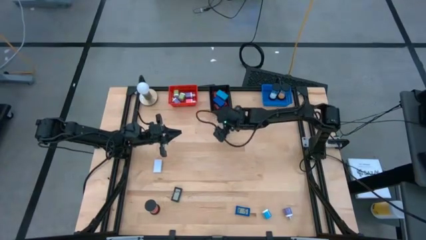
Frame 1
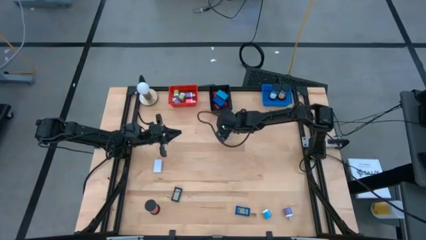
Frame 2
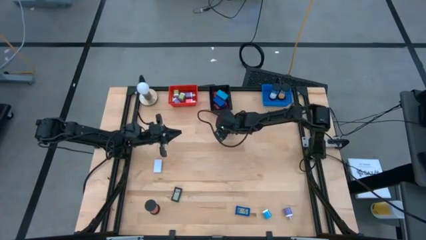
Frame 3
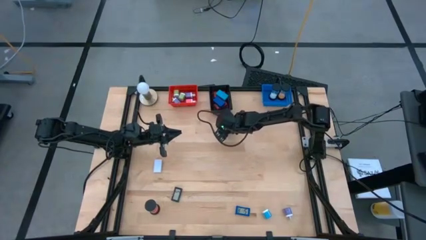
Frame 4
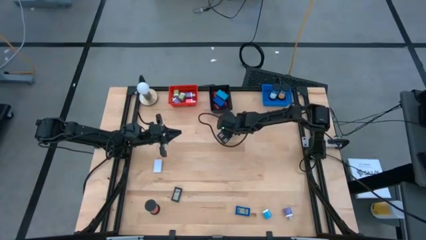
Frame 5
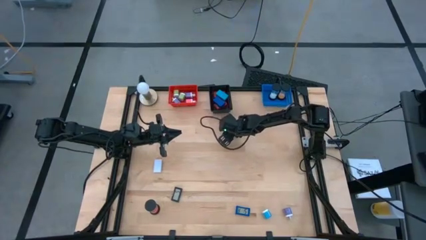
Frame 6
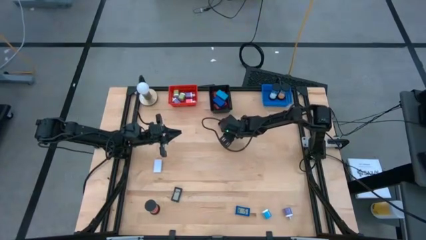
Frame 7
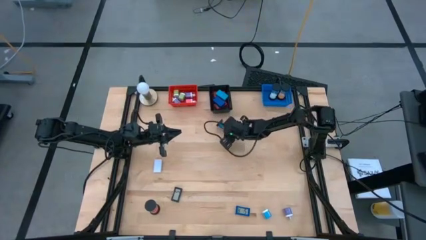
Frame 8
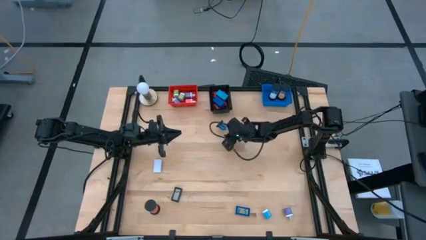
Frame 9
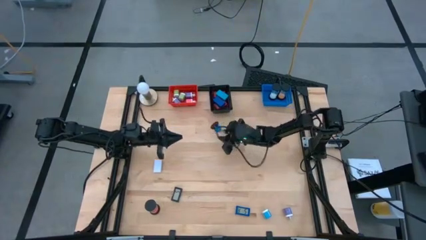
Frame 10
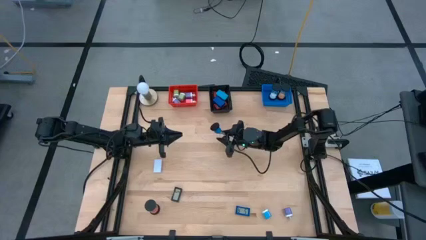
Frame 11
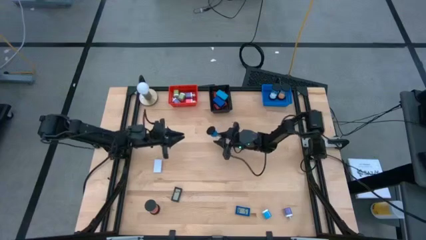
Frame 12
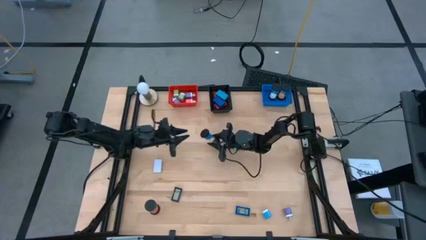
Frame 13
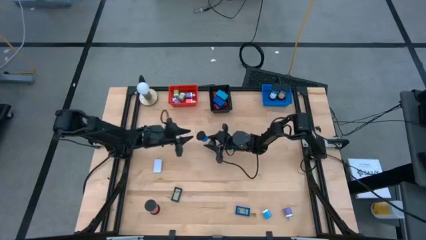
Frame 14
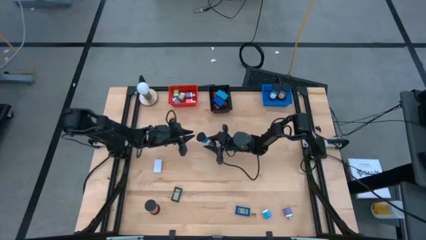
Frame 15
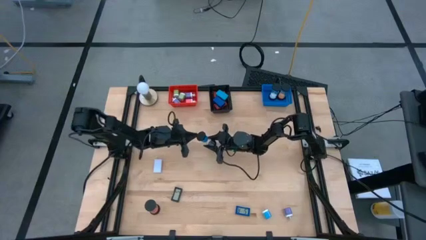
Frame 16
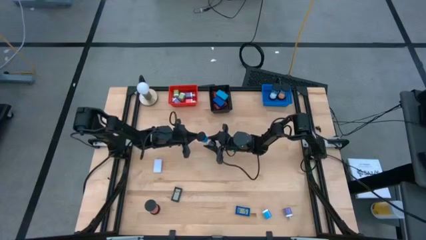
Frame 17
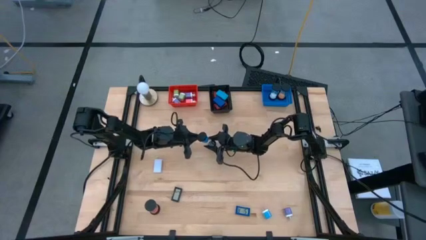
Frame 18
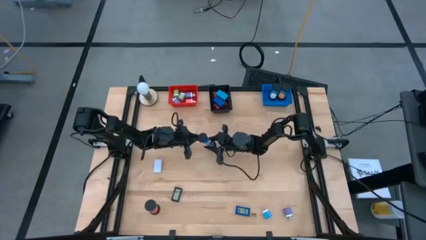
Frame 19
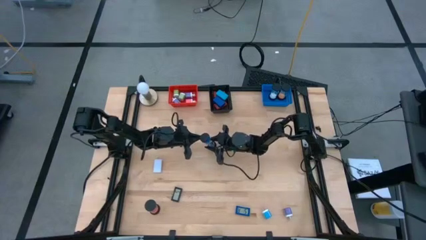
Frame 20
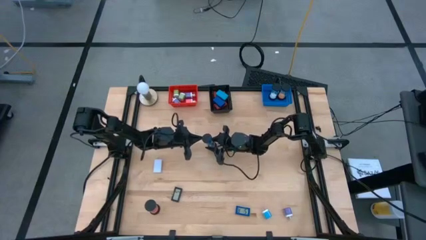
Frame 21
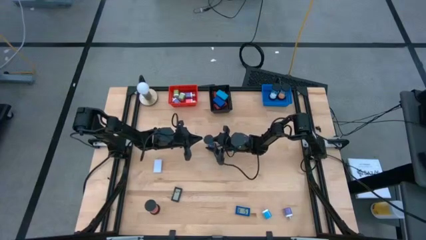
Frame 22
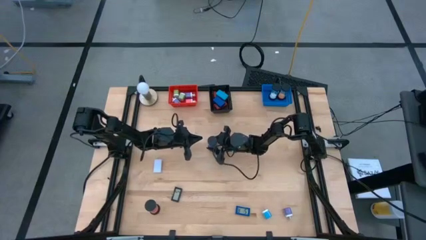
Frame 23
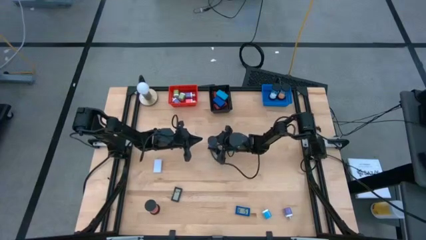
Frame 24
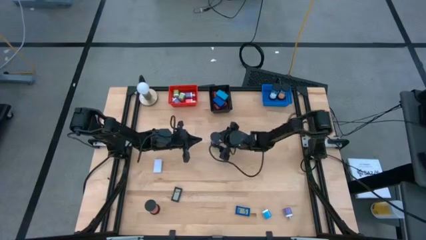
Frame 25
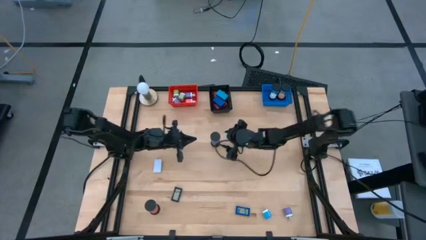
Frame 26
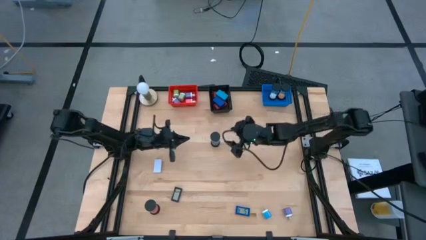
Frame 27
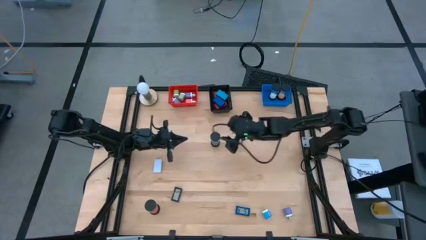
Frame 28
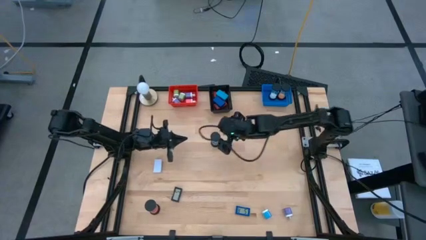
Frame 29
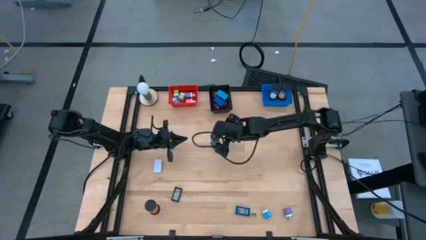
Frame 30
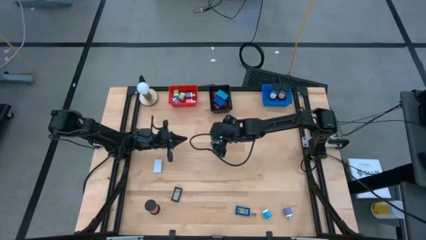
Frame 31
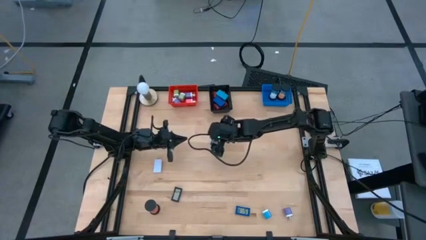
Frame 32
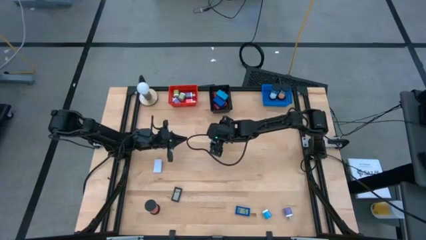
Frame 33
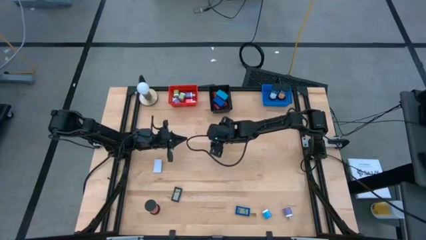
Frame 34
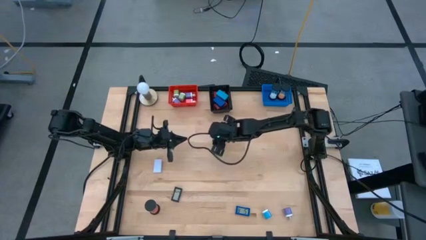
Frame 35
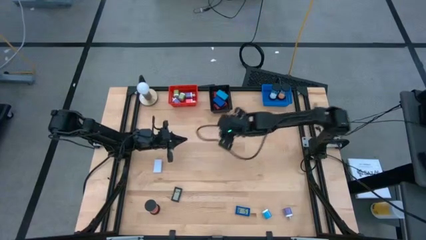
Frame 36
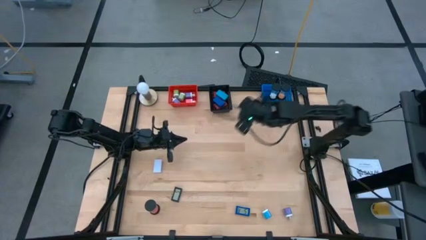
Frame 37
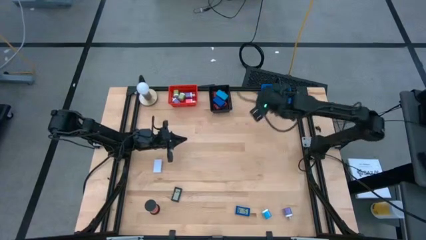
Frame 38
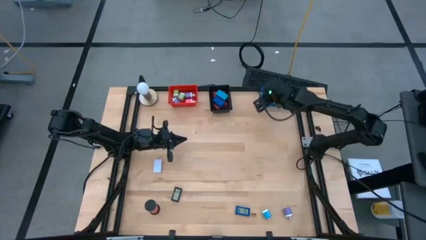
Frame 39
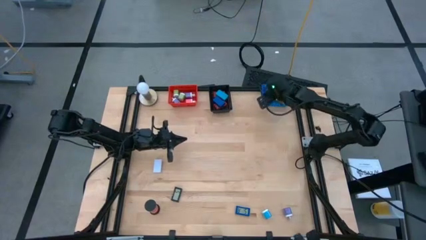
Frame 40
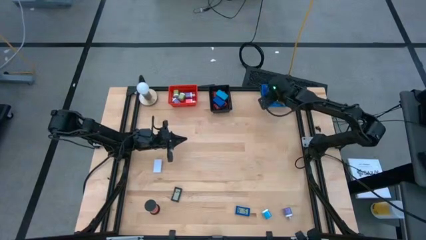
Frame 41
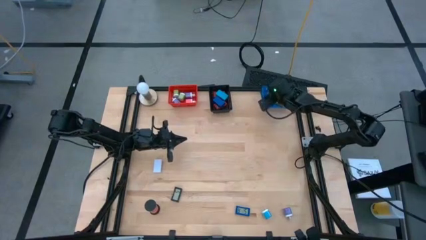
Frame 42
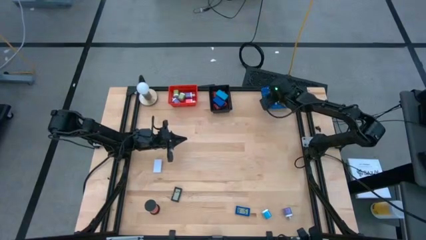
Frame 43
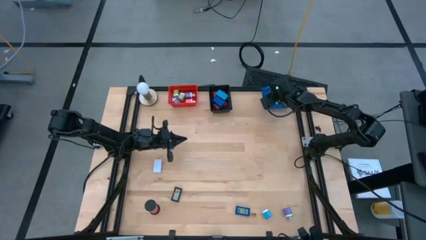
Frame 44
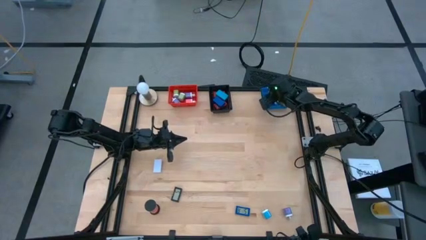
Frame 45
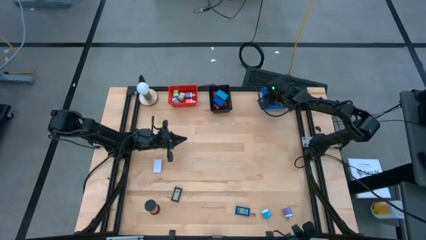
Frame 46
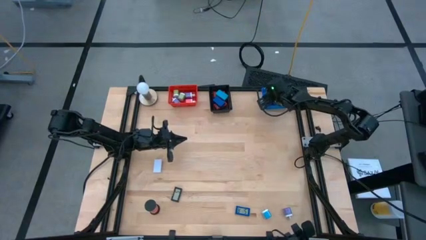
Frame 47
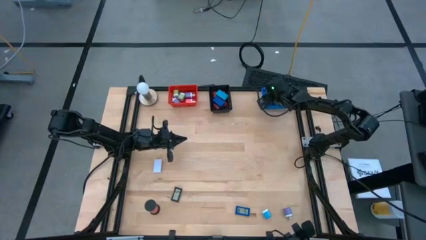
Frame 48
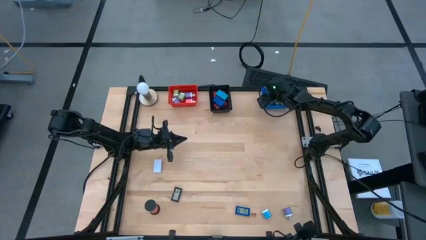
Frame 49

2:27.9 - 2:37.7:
Task: Pick & Place Office items
Put the blue hourglass into the blue bin

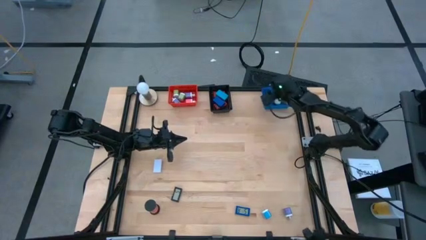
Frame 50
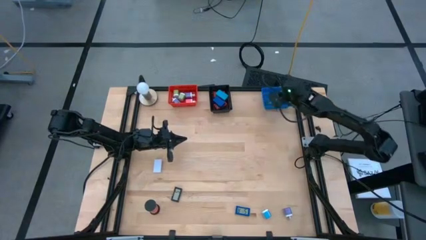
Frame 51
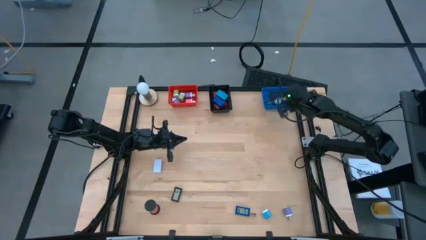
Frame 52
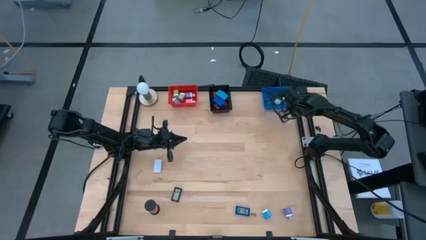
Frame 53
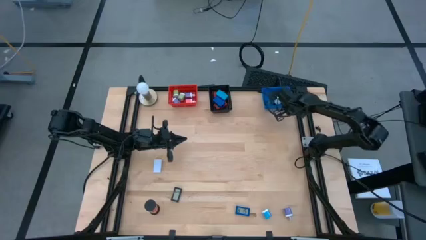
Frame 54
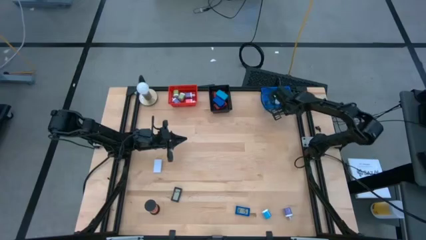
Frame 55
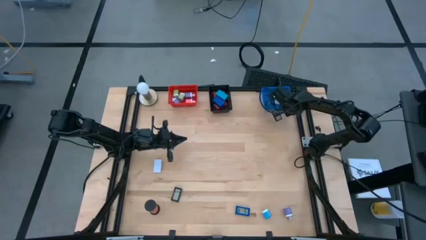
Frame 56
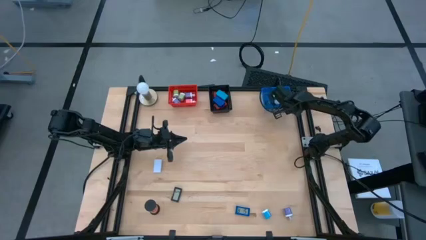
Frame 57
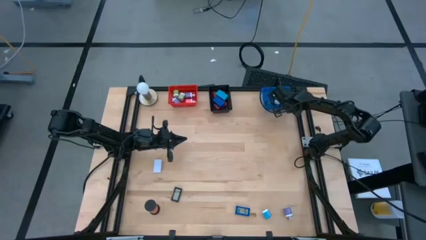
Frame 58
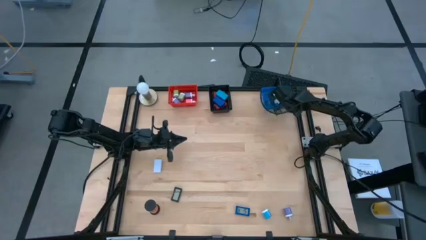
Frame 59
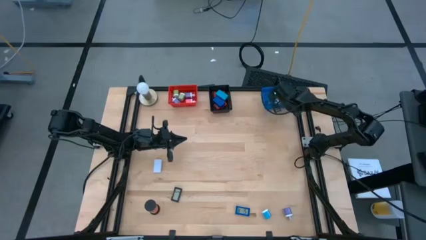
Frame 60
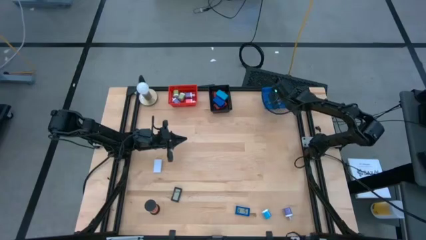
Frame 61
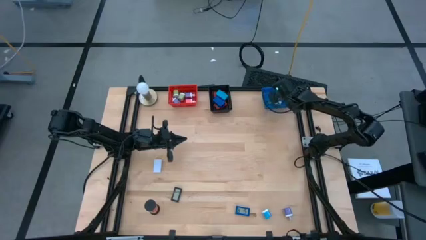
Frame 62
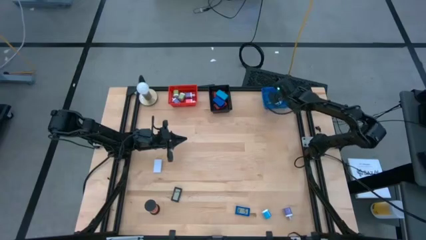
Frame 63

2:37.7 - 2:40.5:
Adjust the orange hourglass in the red bin

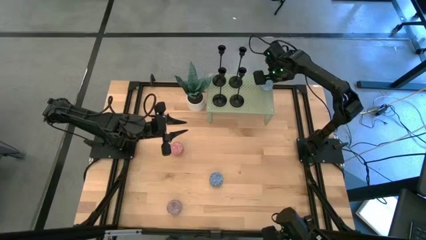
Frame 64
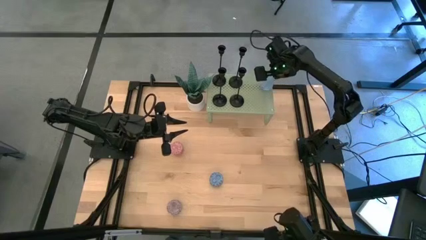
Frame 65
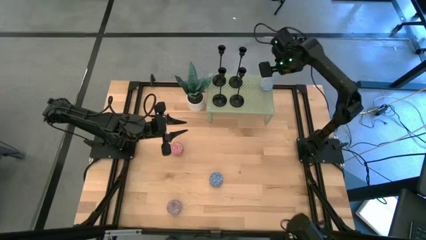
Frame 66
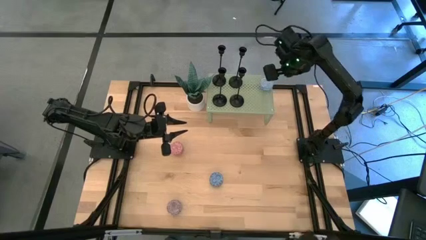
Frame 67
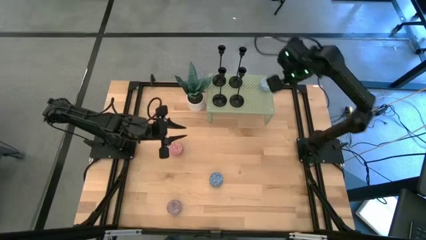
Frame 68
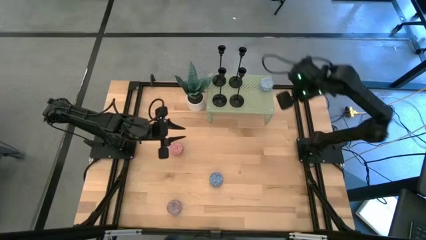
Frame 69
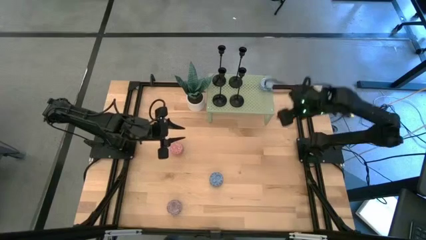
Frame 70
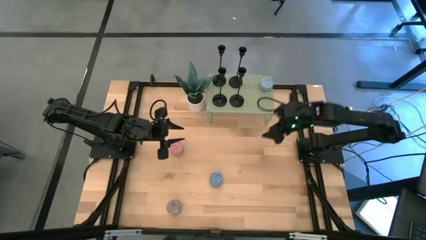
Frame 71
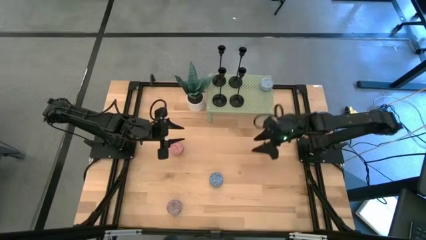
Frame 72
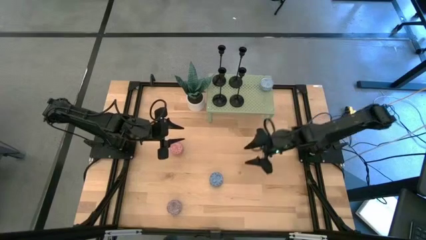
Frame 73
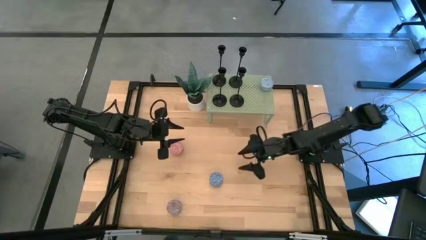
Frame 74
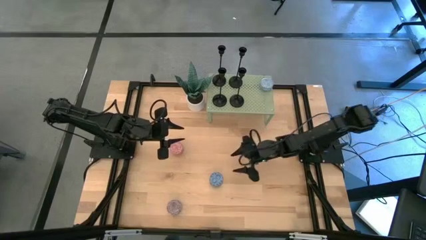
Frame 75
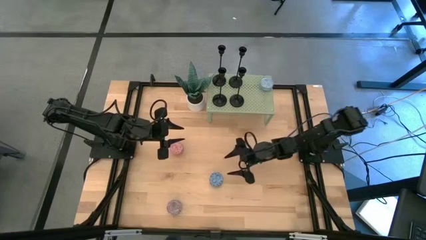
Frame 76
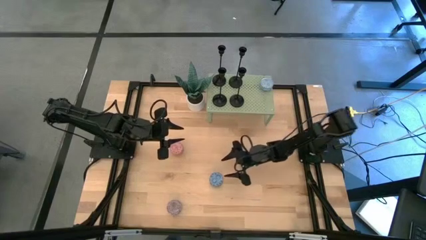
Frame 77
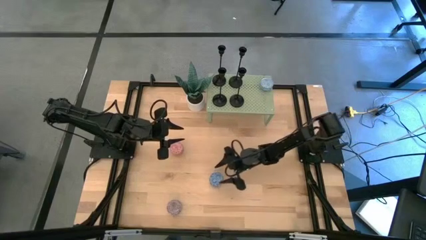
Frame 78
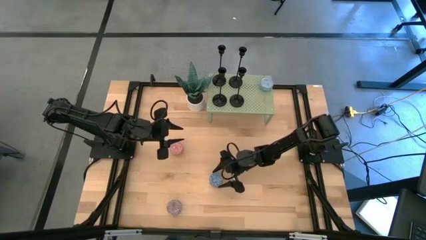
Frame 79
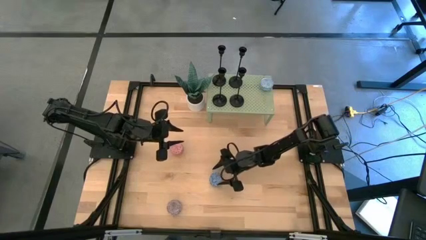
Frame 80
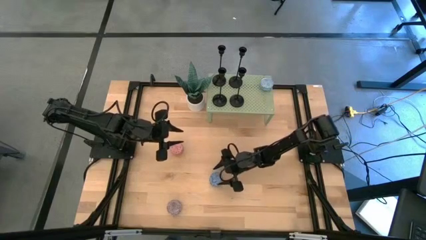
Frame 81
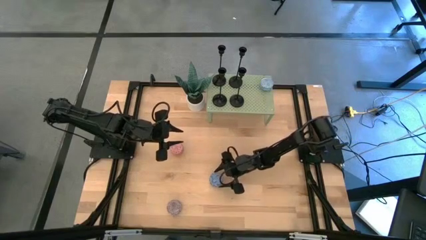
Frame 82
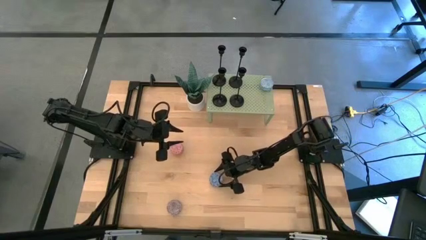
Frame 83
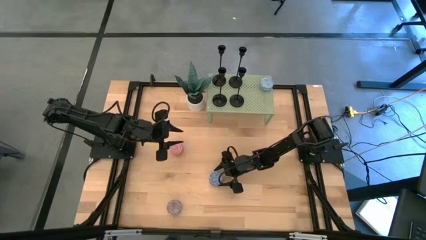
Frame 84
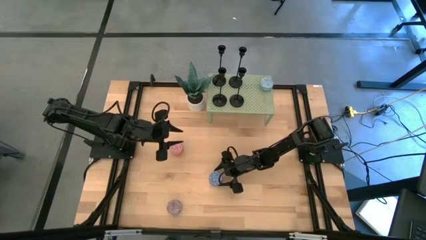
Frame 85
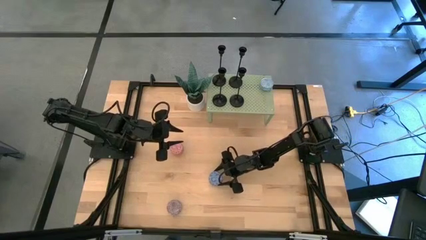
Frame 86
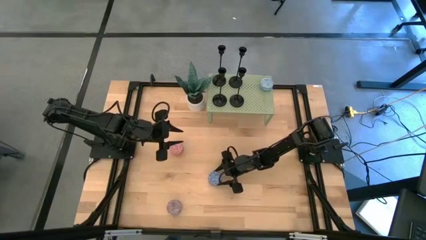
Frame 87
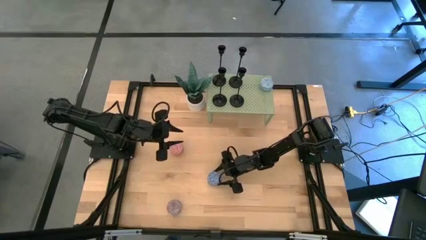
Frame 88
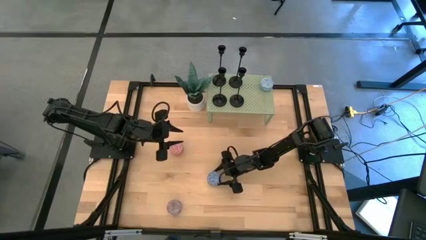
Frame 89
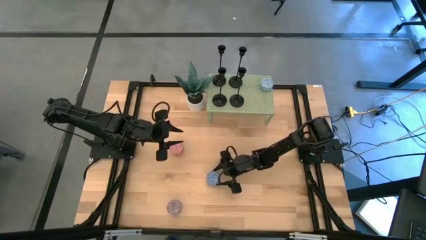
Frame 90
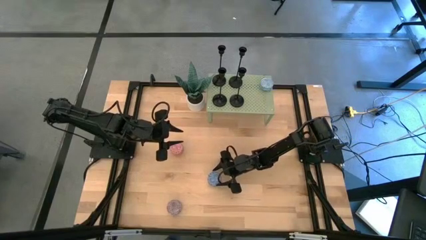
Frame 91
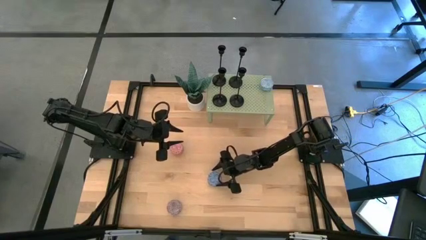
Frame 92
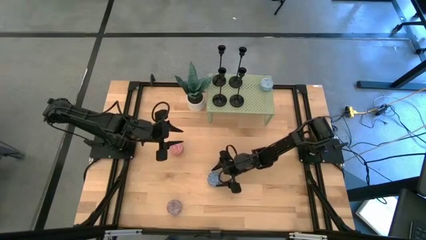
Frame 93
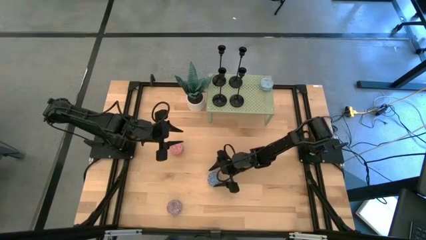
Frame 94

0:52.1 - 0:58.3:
Task: Pick & Place candle stick holders
Align the blue scented candle with the other light blue scented candle on the shelf
